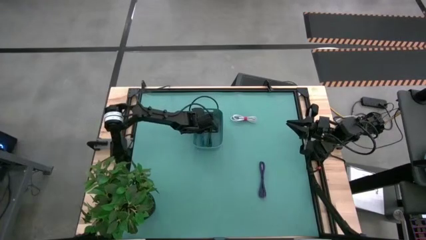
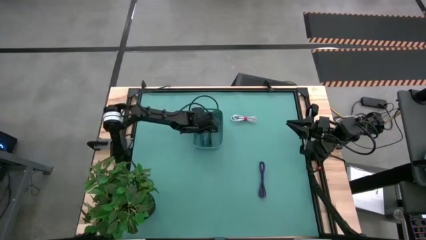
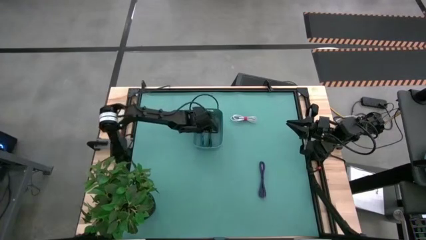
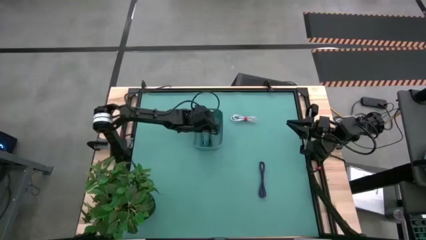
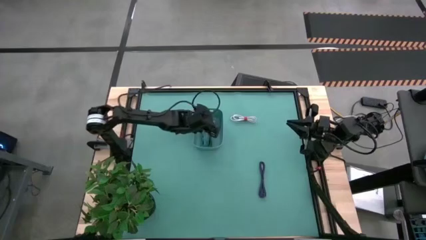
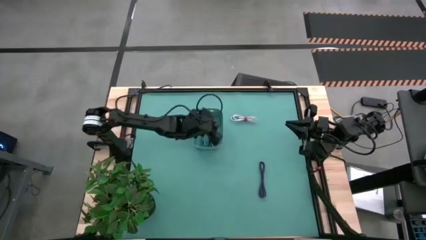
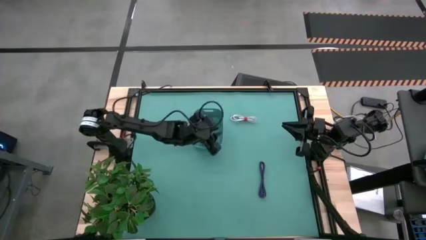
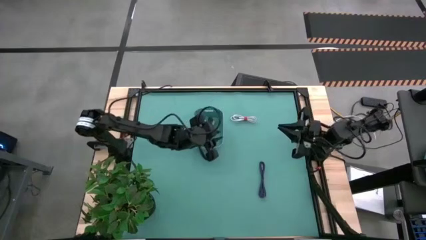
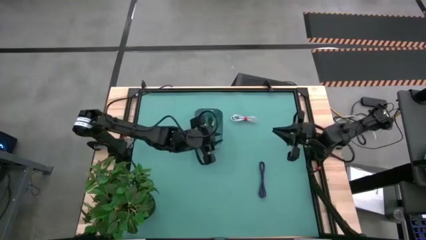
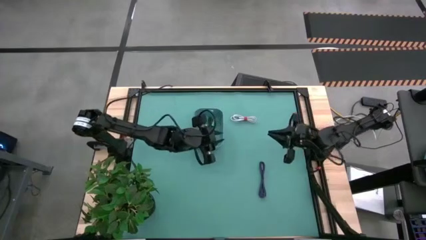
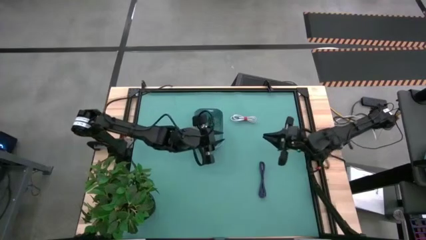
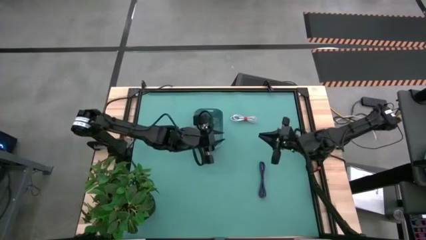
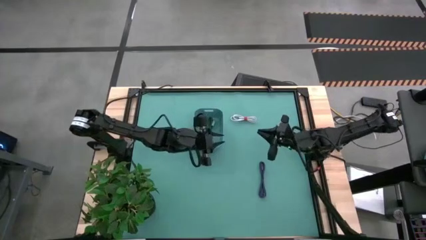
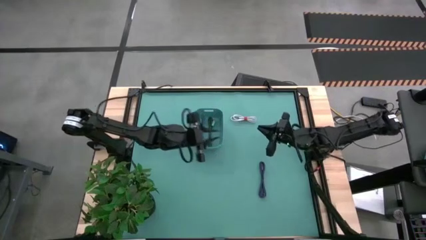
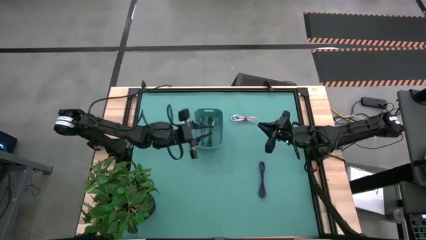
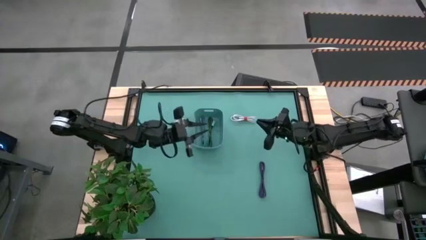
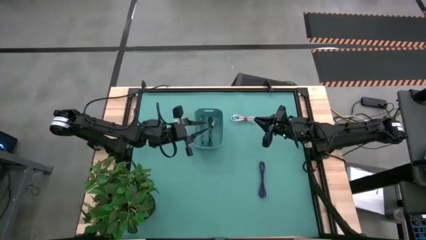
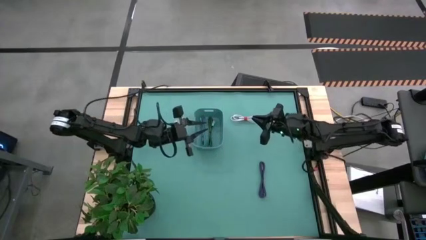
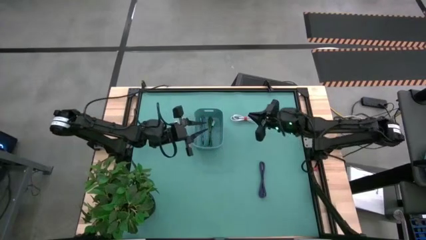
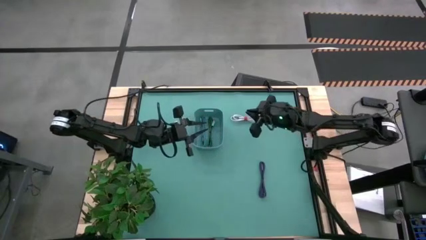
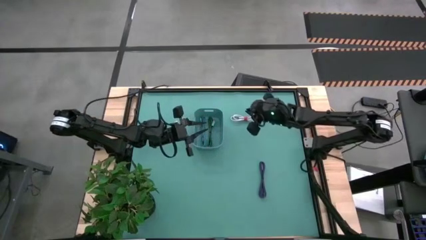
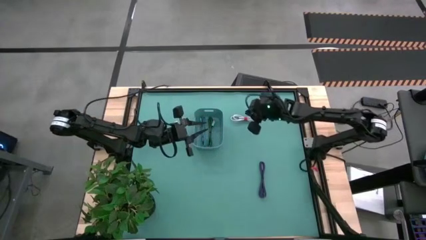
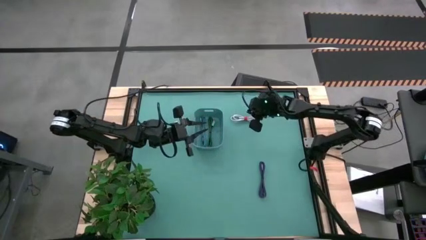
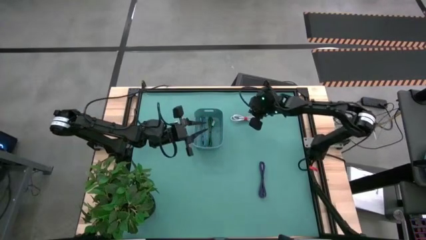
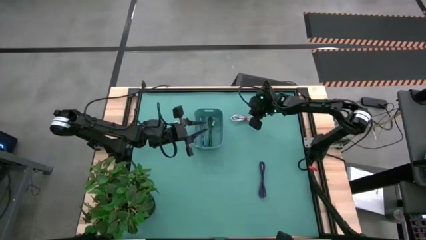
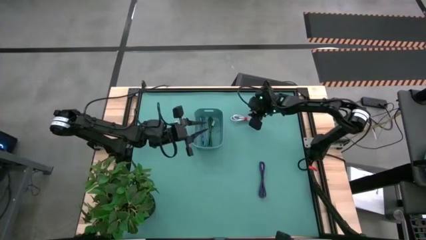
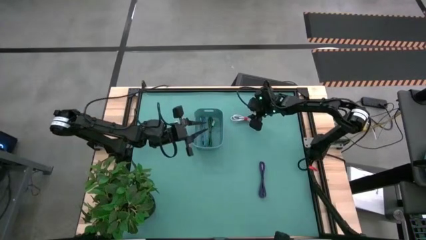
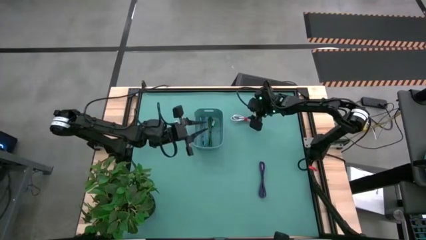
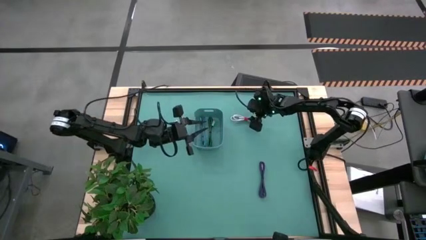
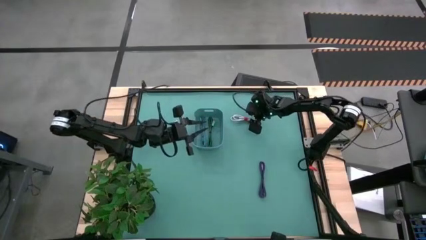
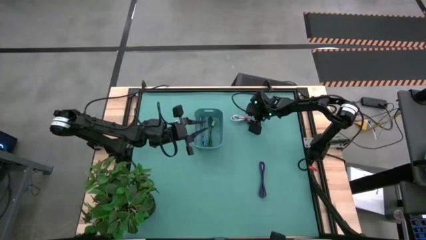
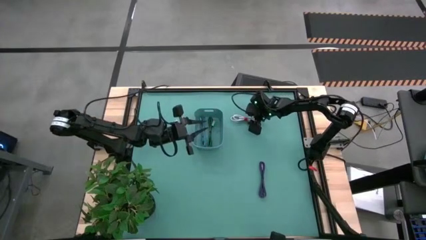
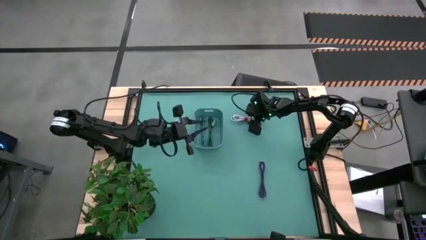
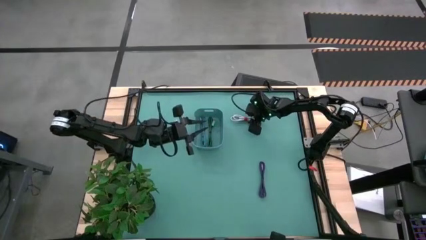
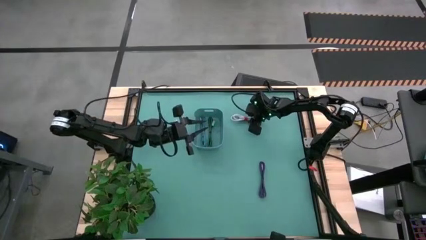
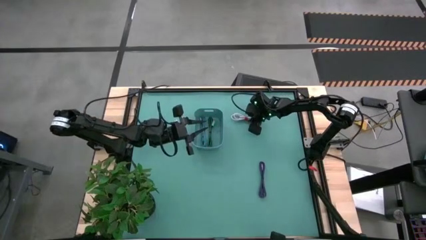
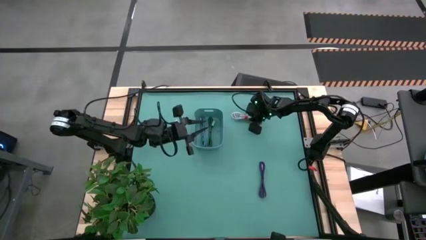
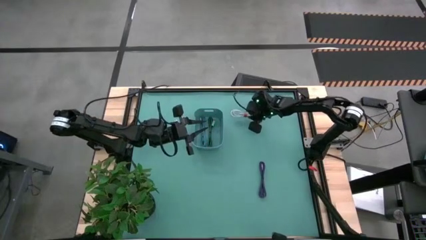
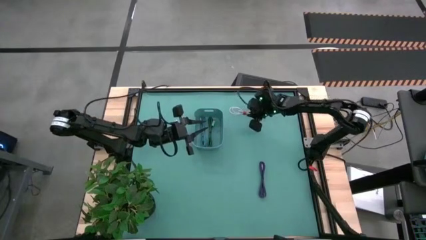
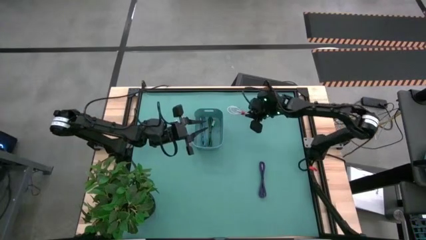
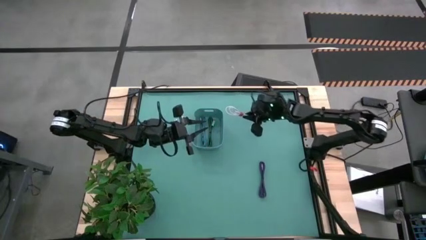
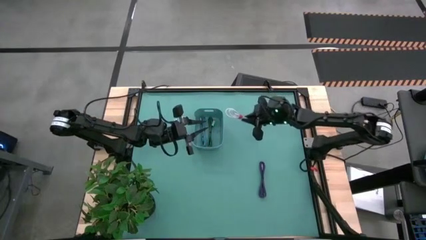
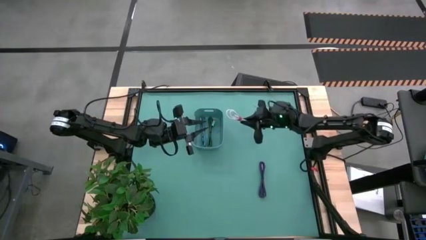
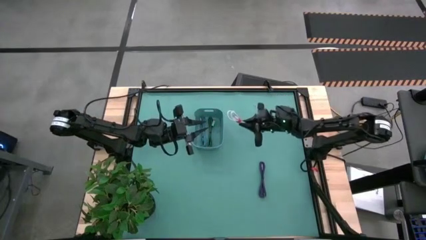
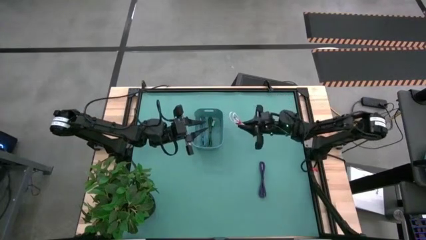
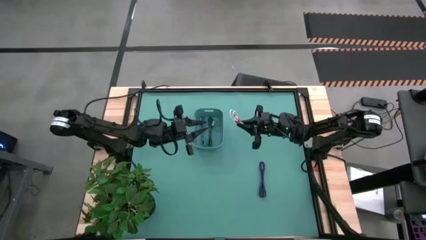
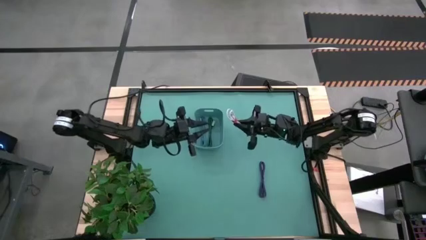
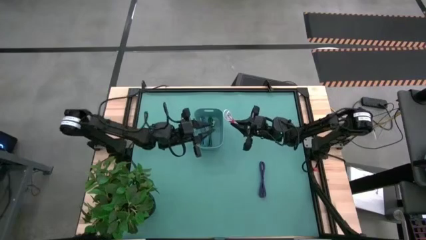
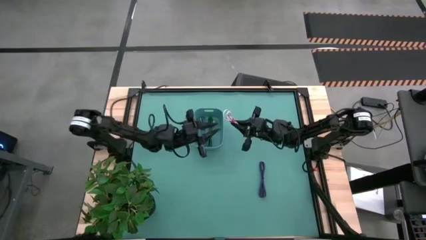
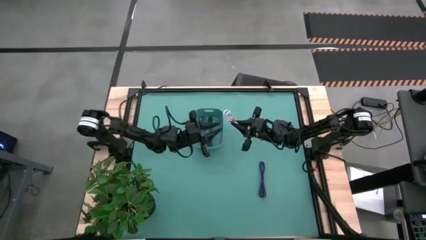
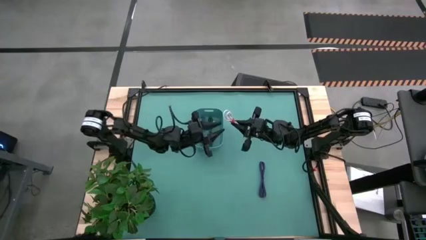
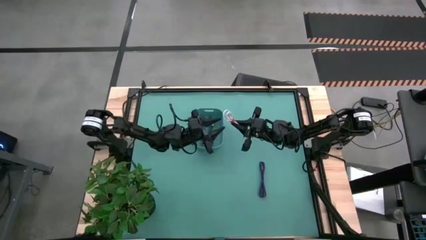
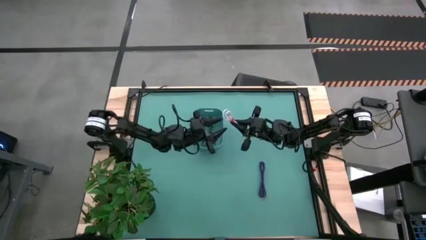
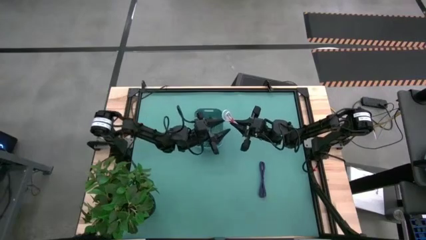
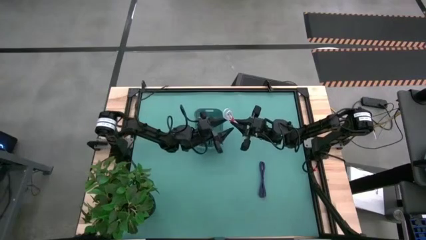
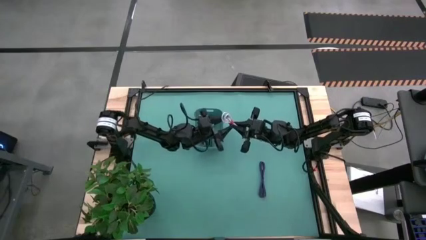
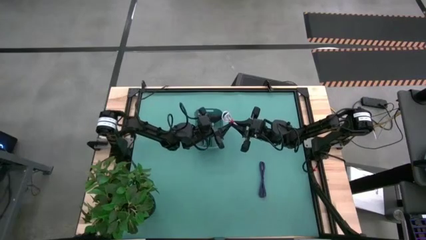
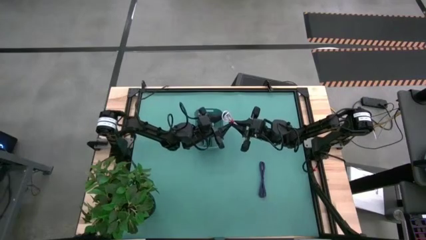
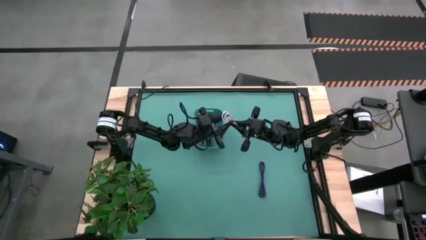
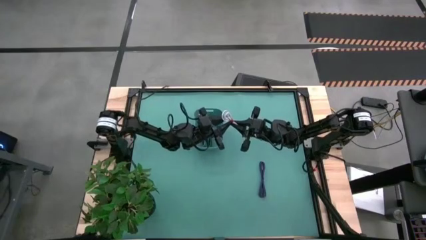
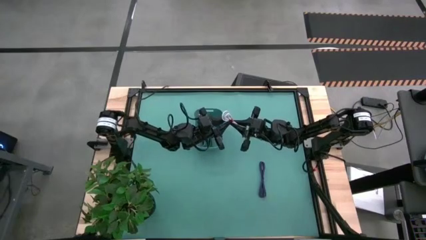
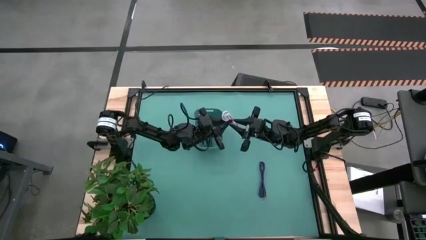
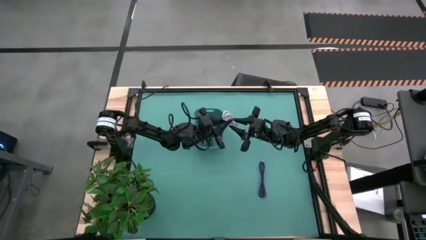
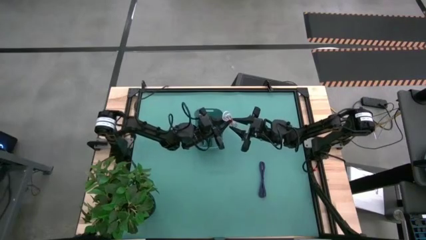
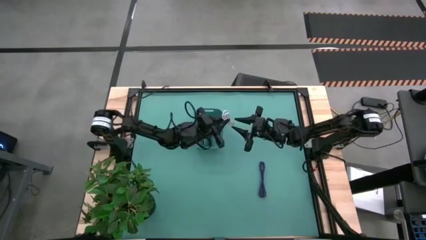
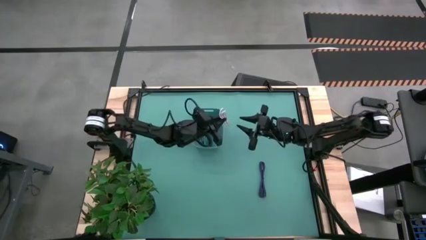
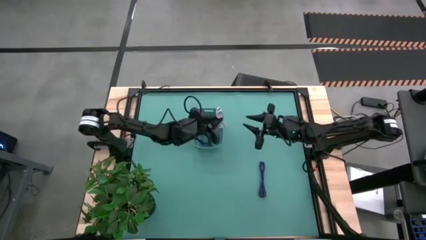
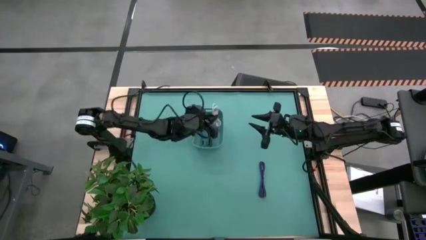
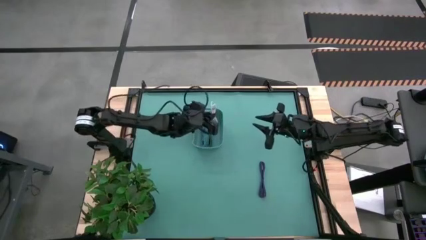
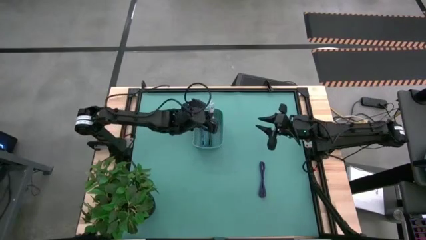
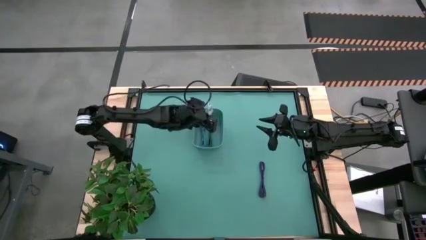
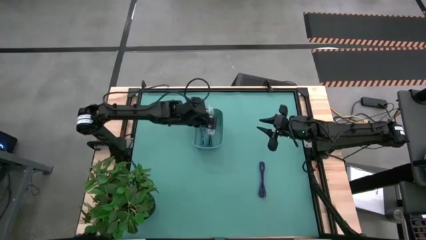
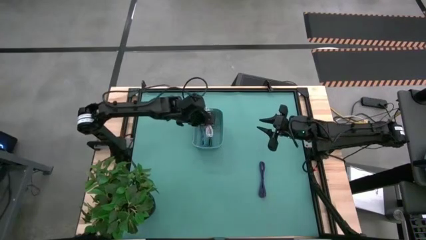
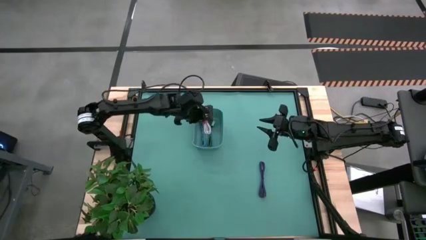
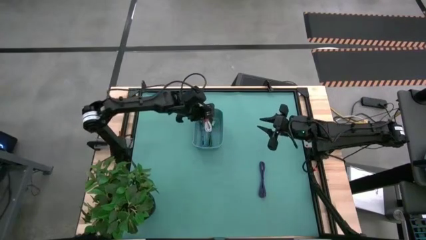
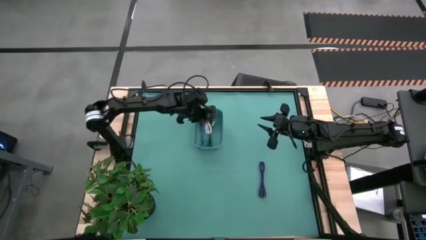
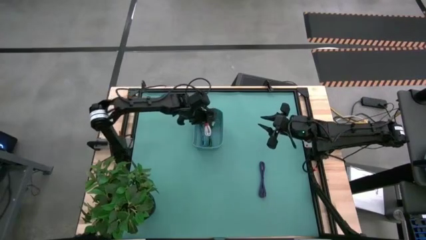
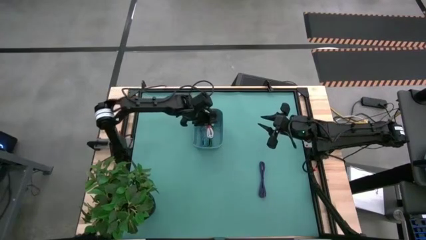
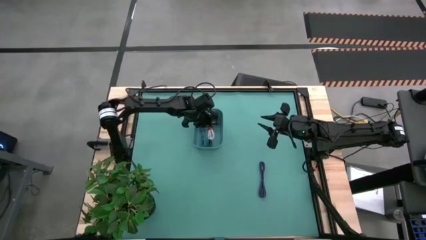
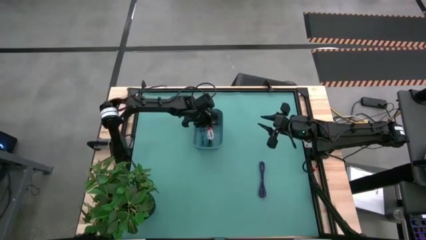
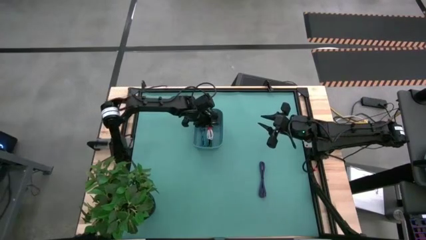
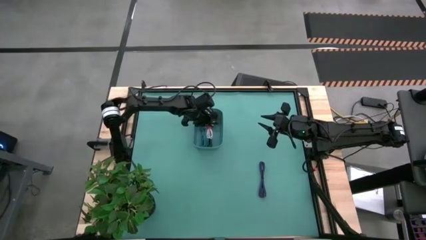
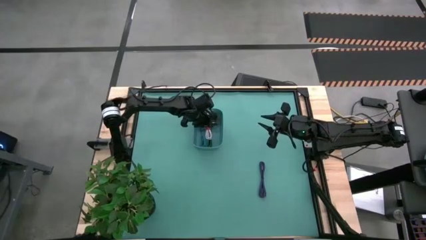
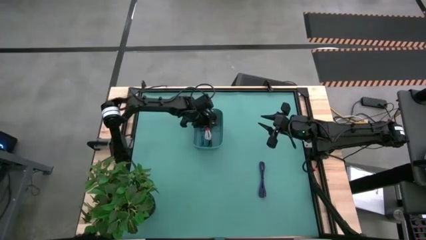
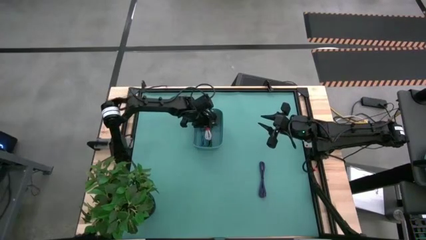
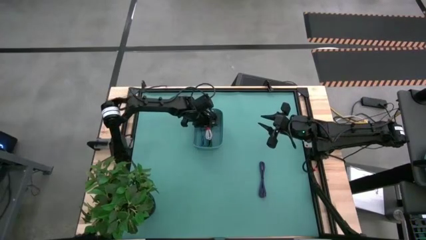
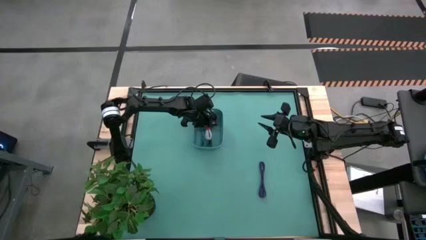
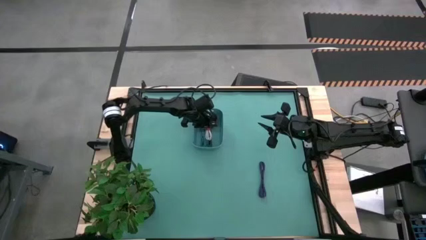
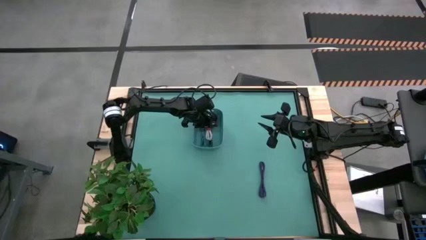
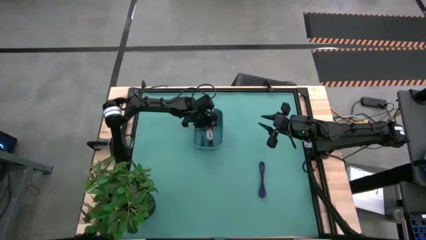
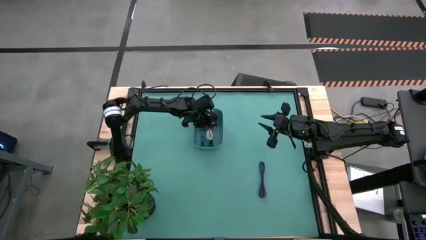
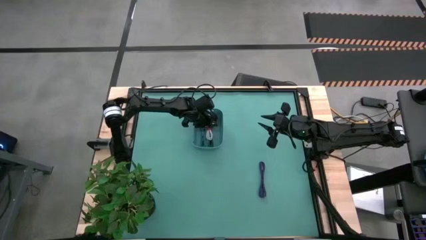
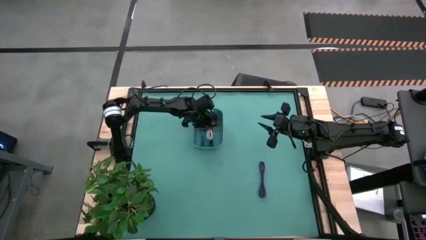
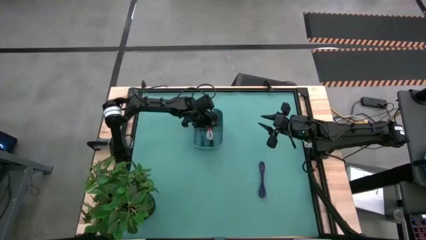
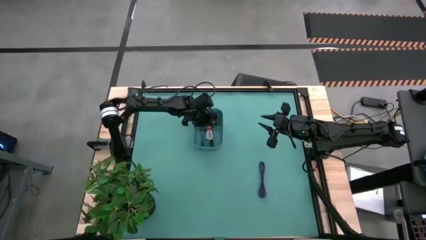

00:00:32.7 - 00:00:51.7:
Task: Pick and place USB-C Cables
Put the white charger cable into the bin
